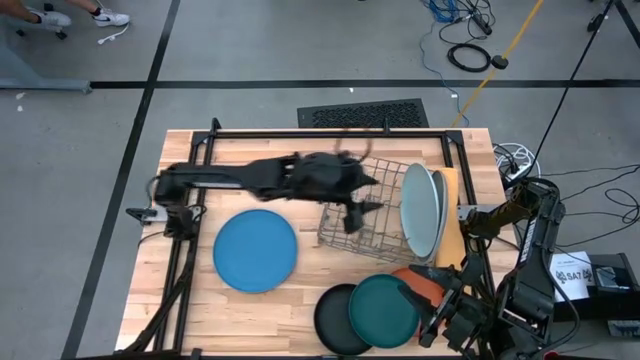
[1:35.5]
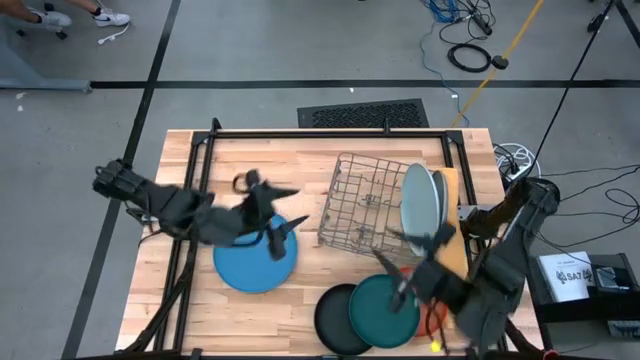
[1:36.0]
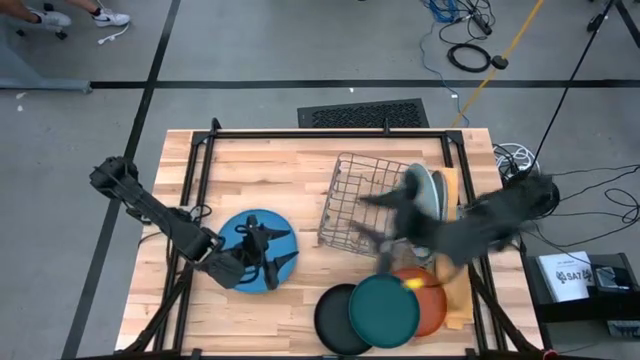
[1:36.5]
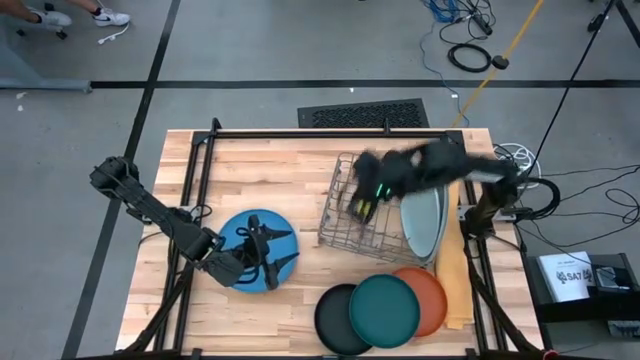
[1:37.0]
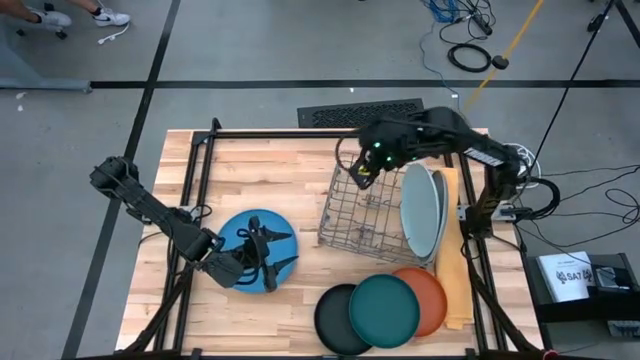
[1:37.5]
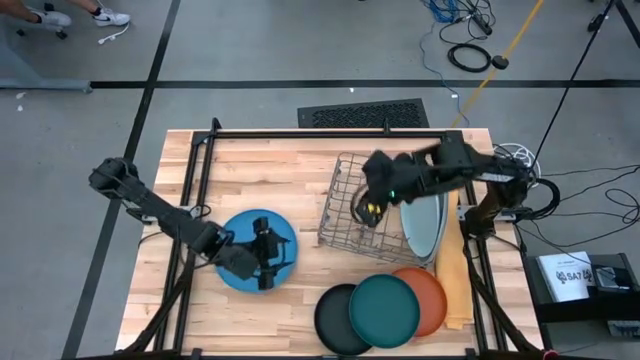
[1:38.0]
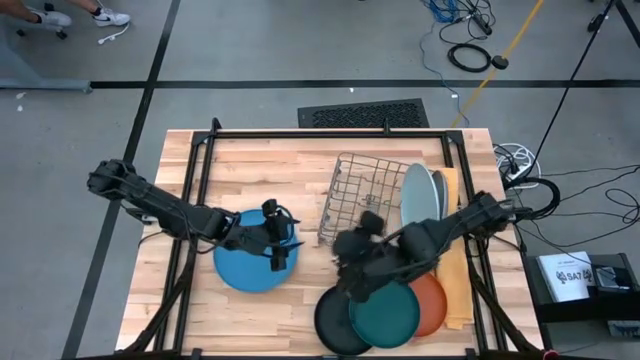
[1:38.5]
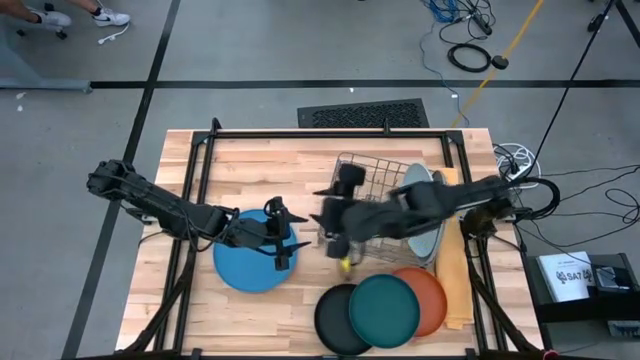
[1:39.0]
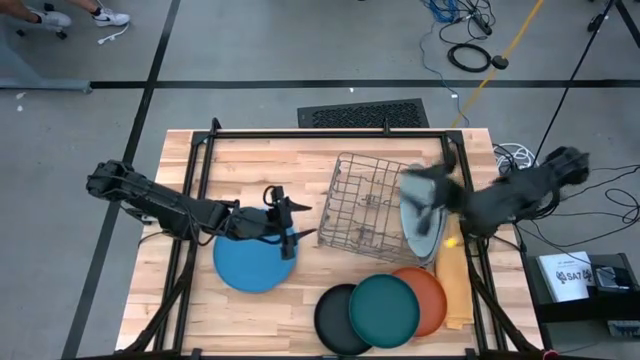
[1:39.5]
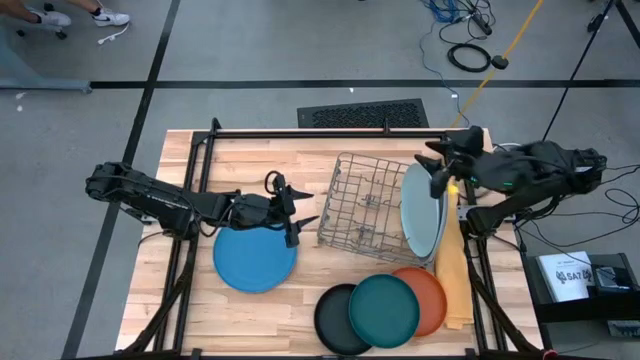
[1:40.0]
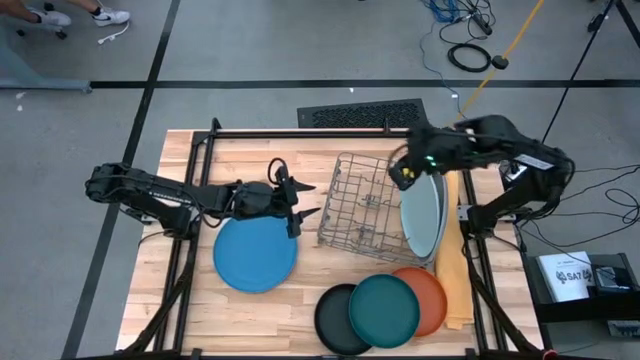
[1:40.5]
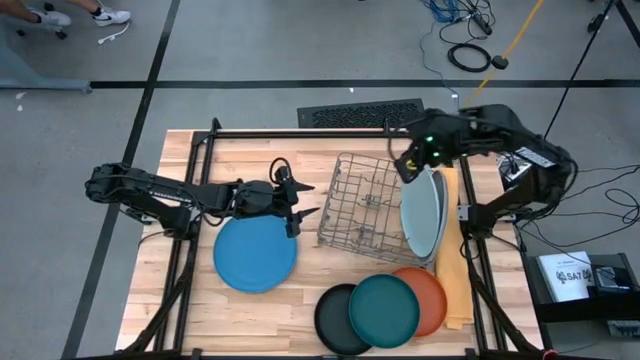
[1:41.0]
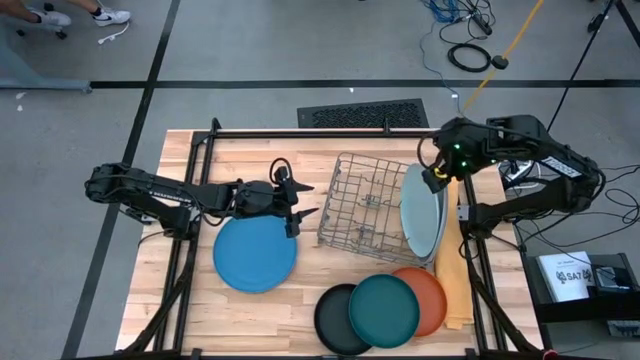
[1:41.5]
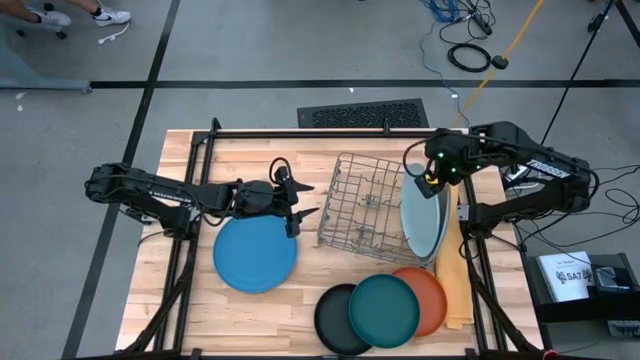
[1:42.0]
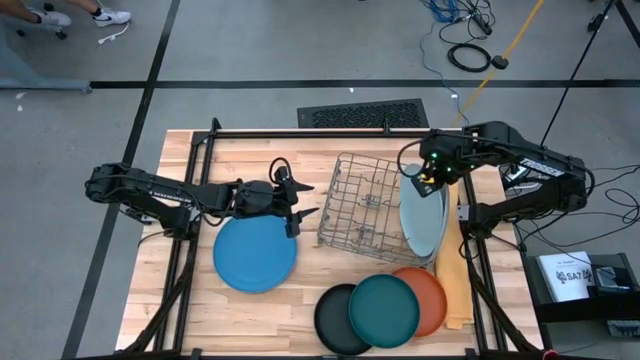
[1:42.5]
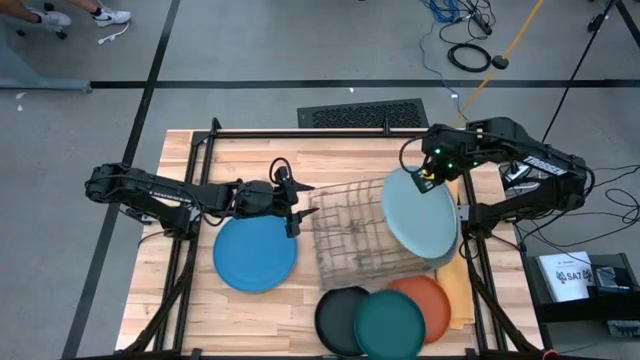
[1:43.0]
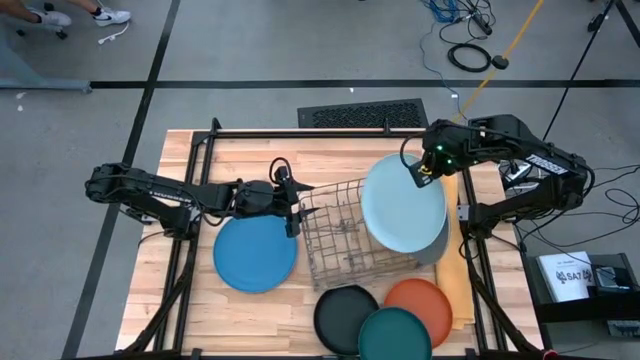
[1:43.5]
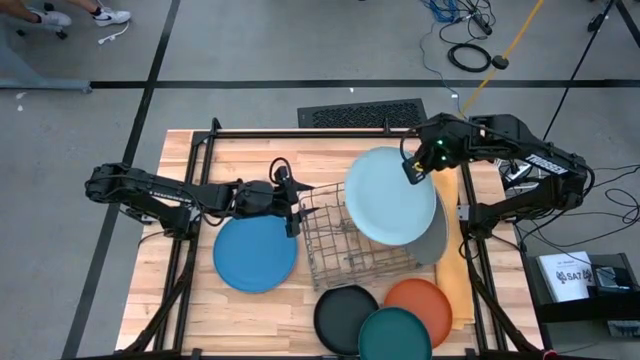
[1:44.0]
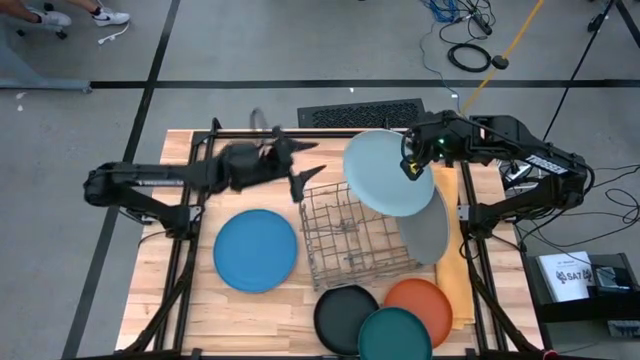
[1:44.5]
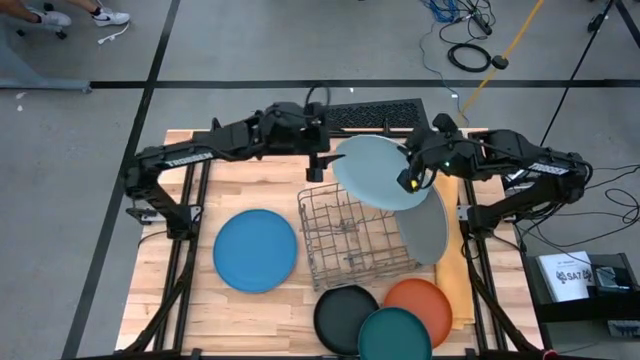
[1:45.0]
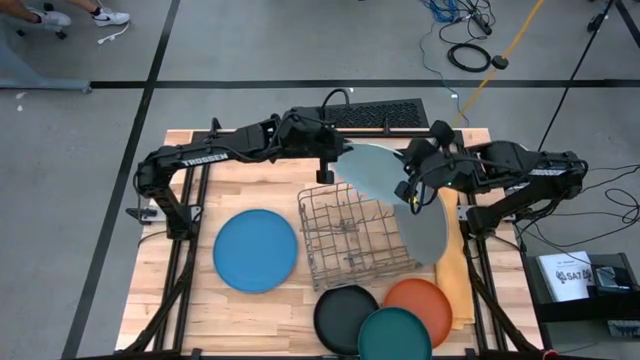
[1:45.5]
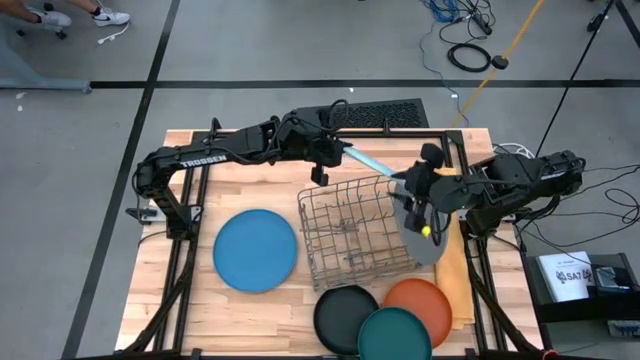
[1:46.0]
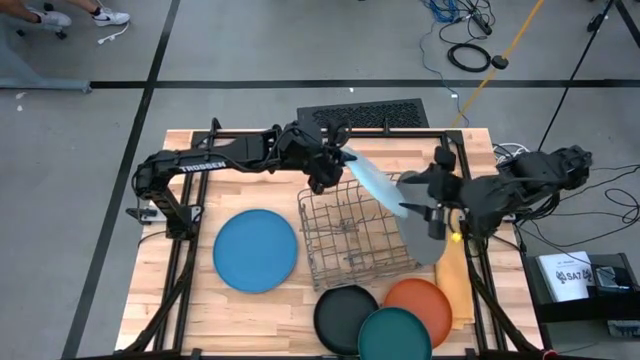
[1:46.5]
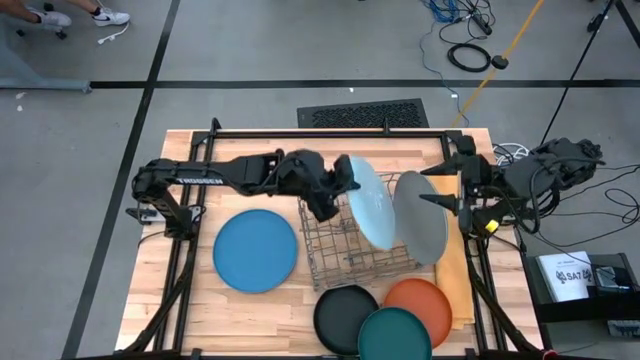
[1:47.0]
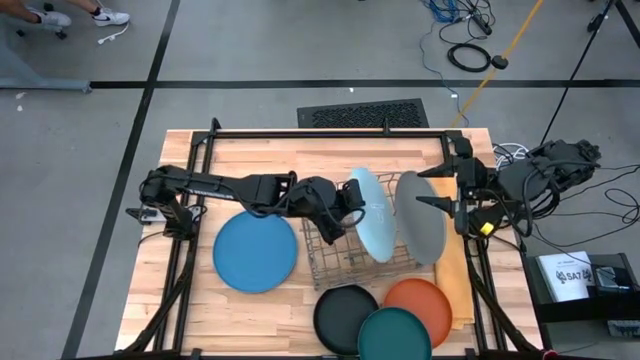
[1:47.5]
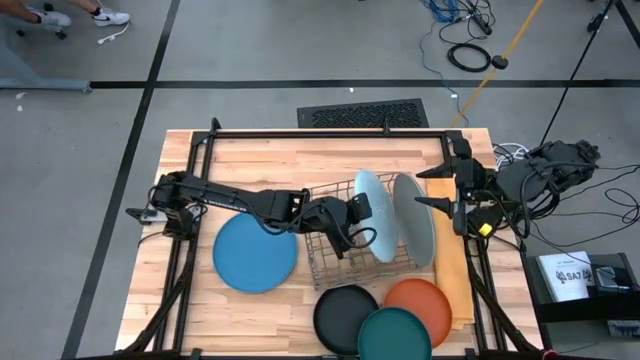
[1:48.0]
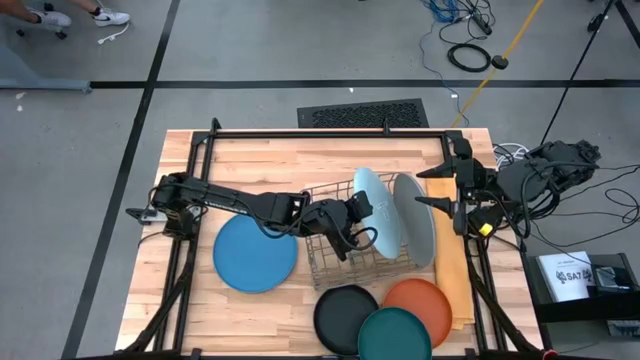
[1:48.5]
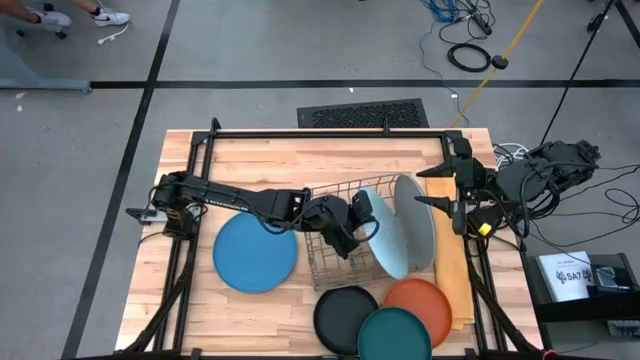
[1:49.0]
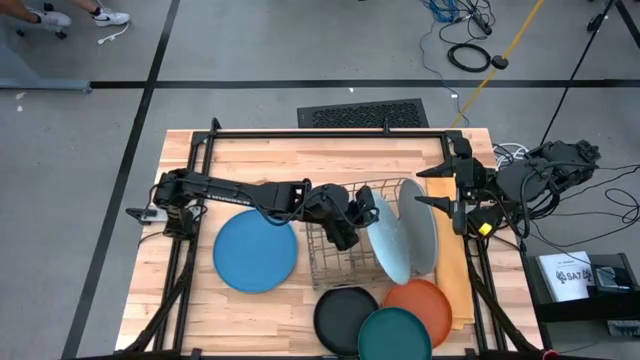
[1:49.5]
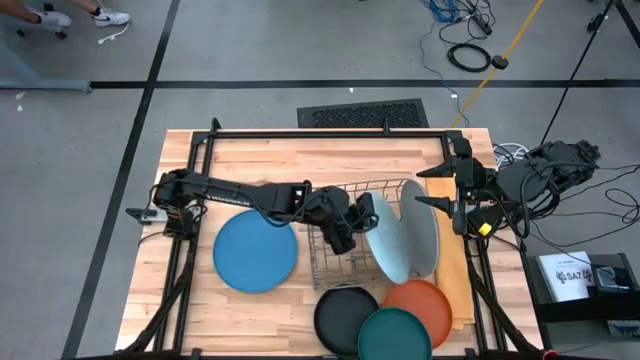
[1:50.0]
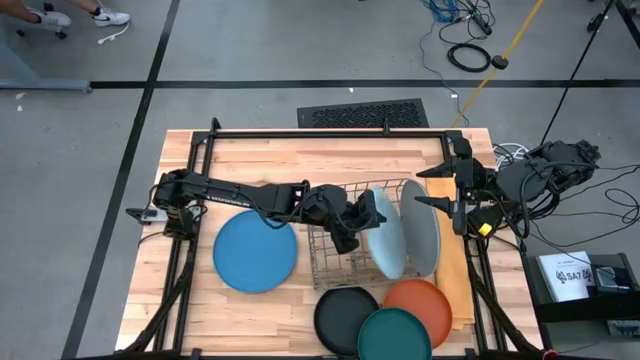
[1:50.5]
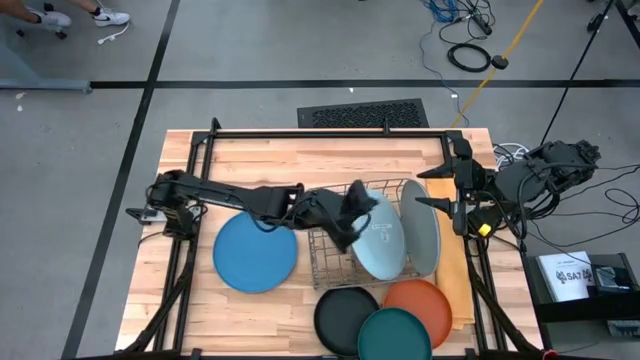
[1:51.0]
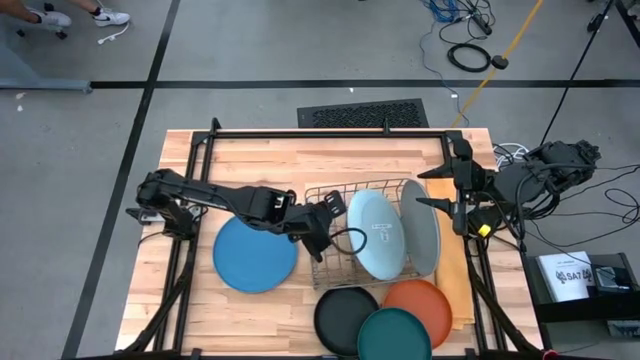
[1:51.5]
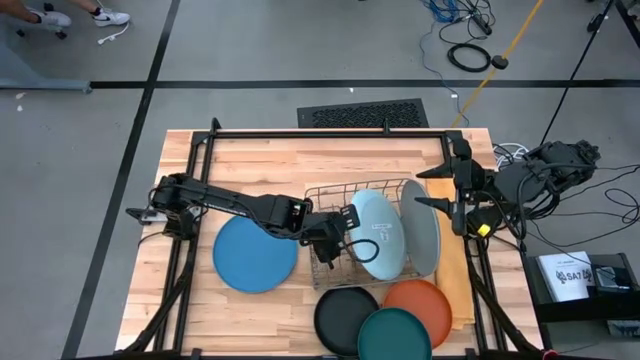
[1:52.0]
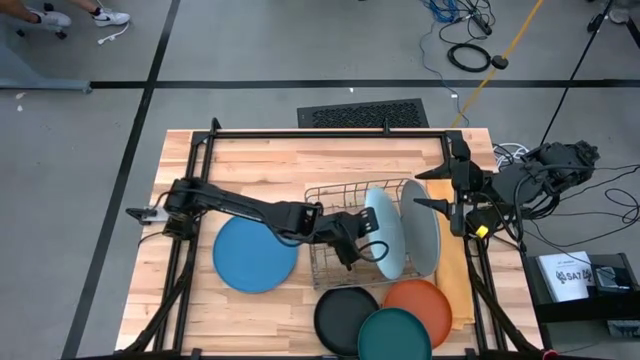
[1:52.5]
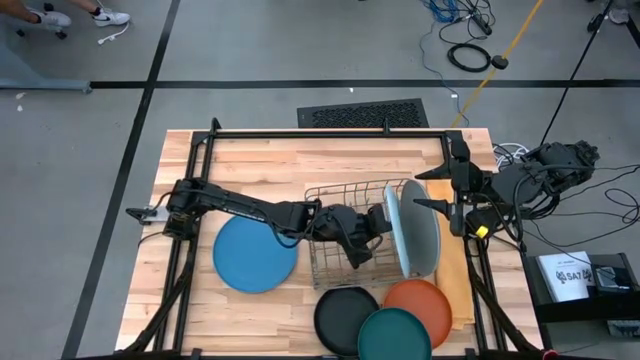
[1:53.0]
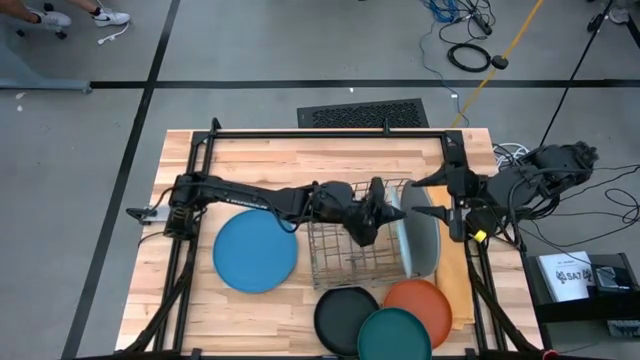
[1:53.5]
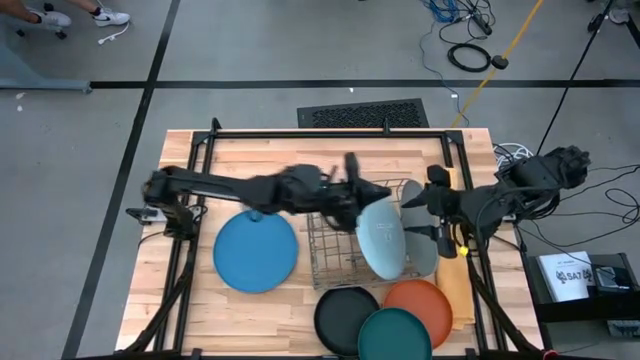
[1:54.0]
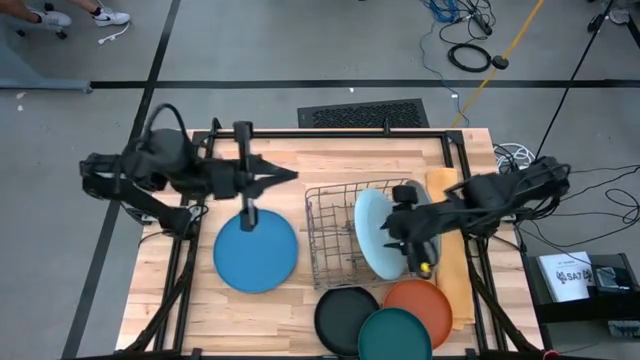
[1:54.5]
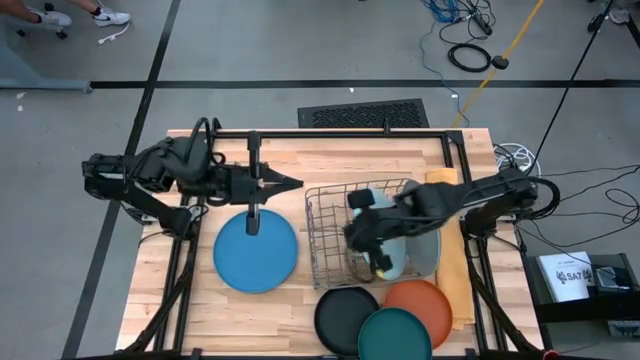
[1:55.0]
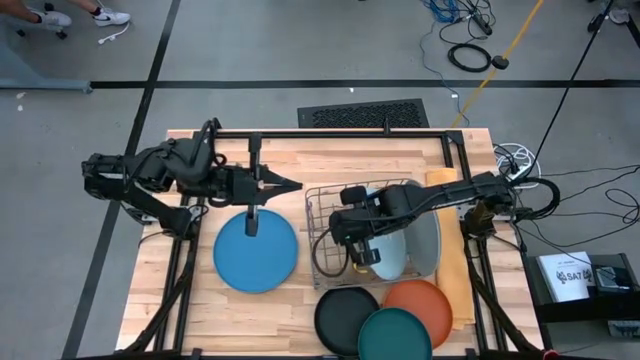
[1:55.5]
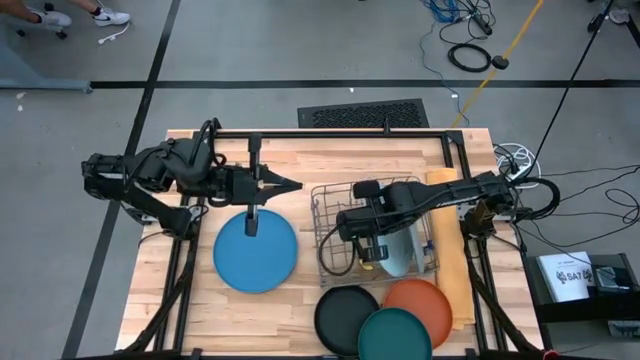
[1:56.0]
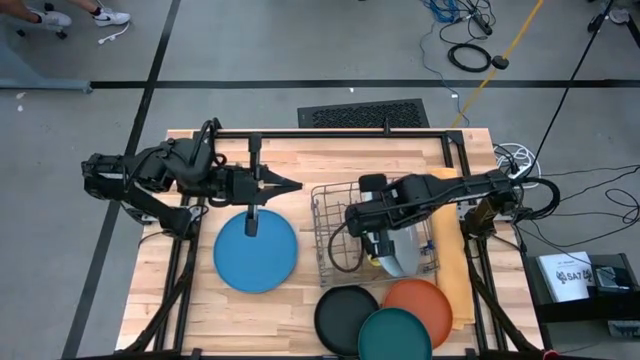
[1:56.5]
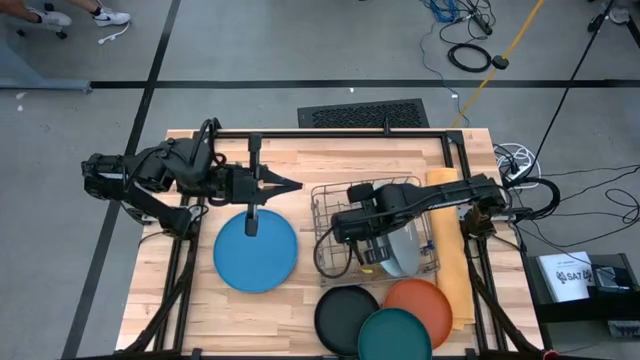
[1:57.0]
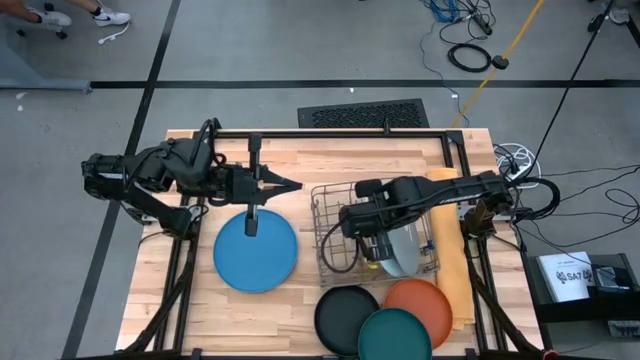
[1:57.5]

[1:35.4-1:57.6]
Task: Sort dishes
Put the light blue plate into the dish rack
